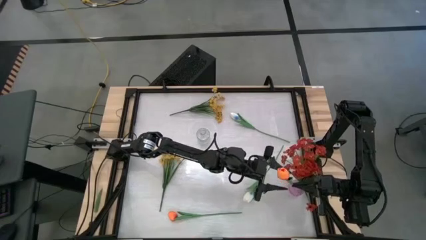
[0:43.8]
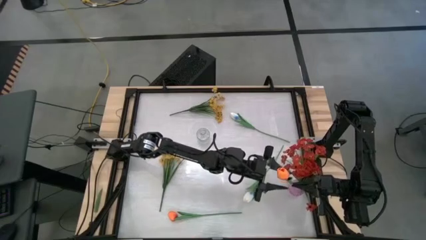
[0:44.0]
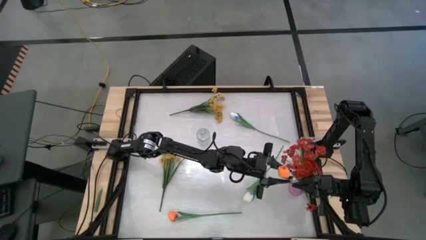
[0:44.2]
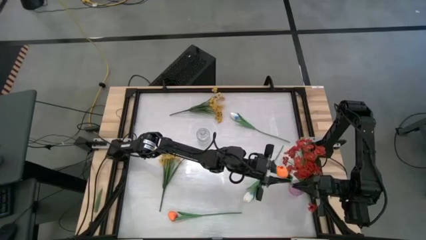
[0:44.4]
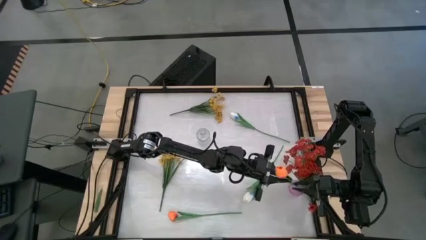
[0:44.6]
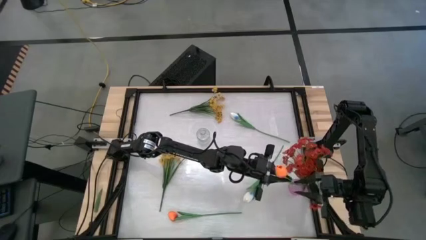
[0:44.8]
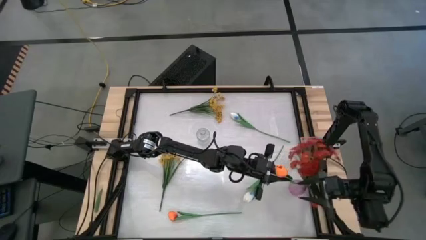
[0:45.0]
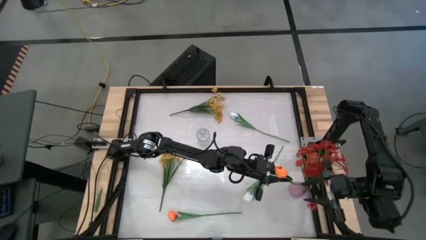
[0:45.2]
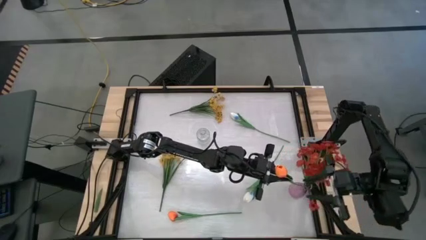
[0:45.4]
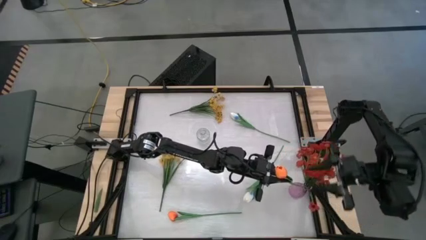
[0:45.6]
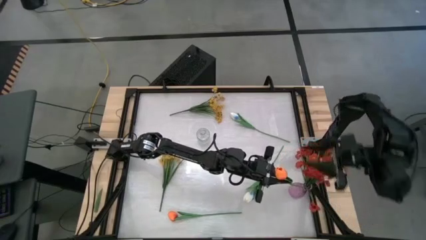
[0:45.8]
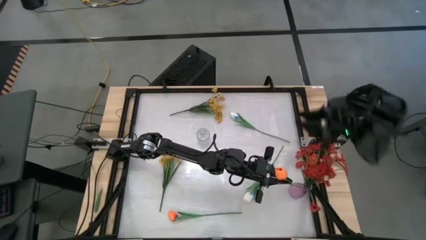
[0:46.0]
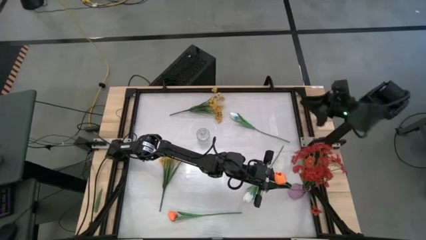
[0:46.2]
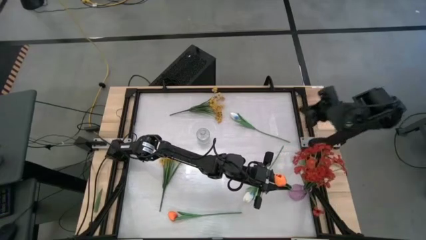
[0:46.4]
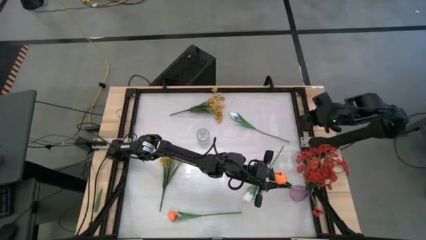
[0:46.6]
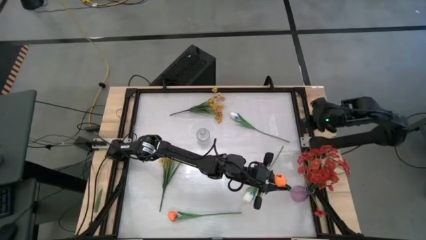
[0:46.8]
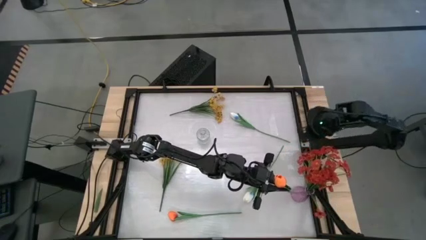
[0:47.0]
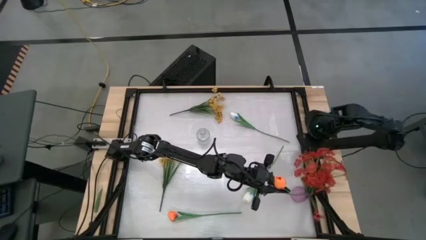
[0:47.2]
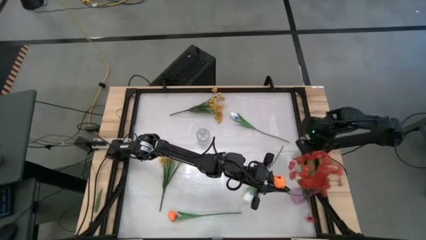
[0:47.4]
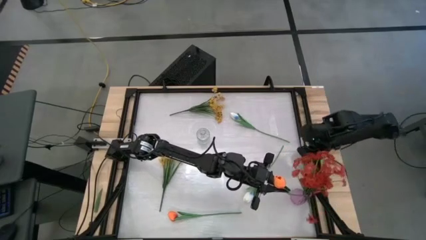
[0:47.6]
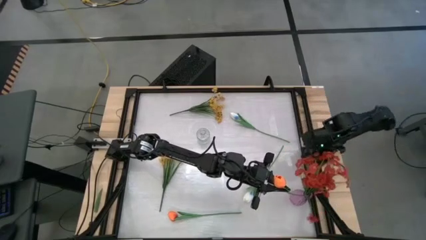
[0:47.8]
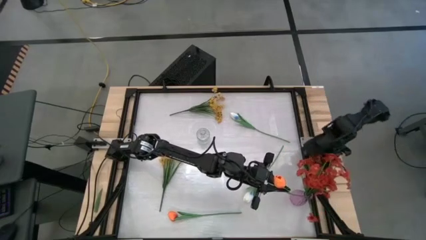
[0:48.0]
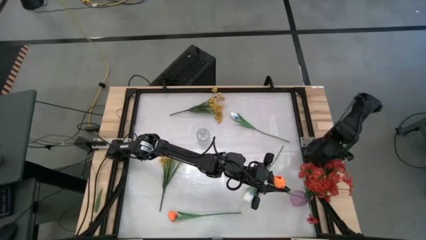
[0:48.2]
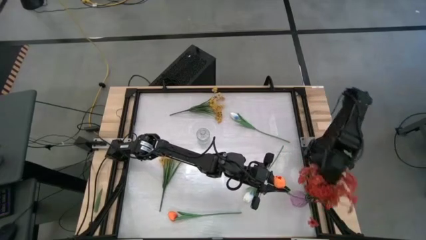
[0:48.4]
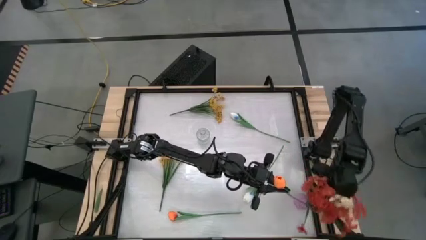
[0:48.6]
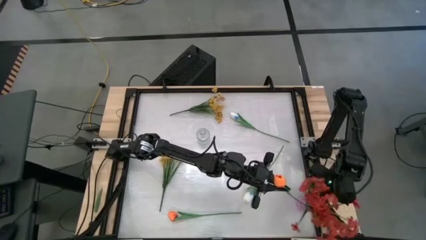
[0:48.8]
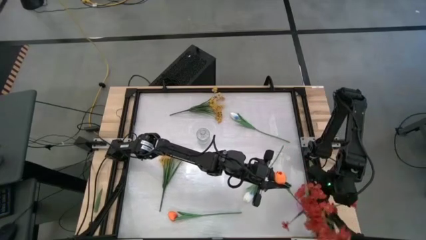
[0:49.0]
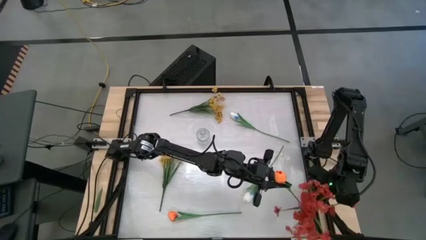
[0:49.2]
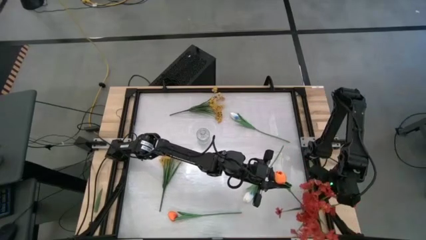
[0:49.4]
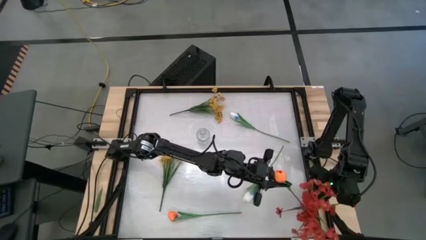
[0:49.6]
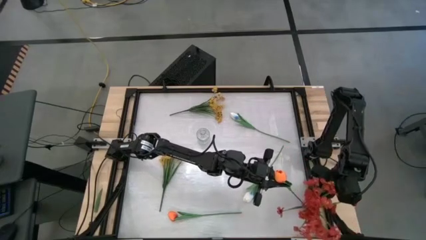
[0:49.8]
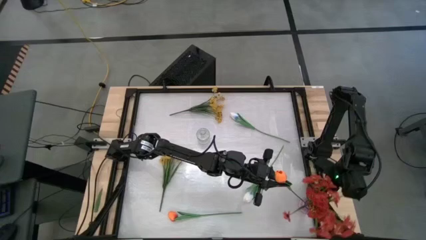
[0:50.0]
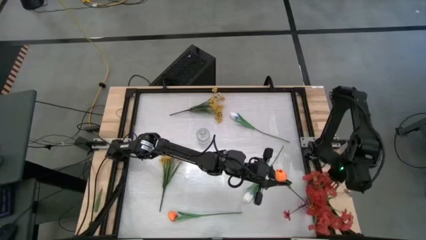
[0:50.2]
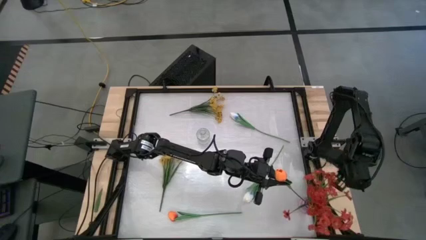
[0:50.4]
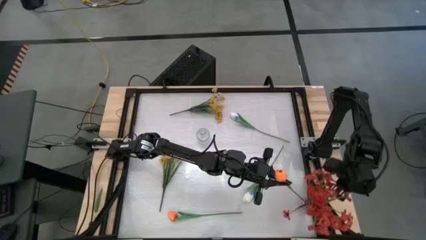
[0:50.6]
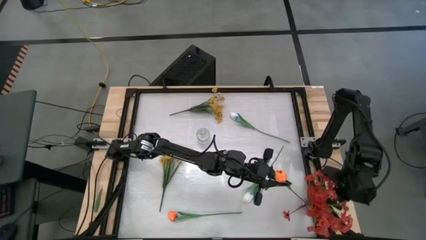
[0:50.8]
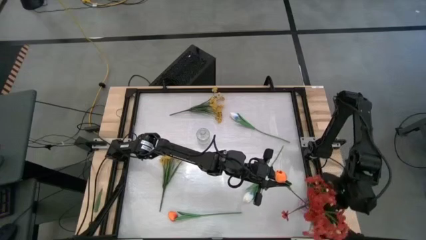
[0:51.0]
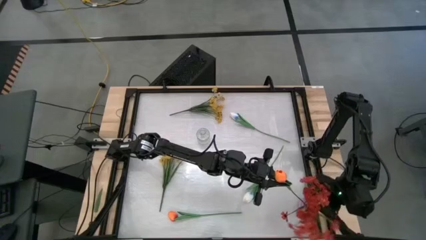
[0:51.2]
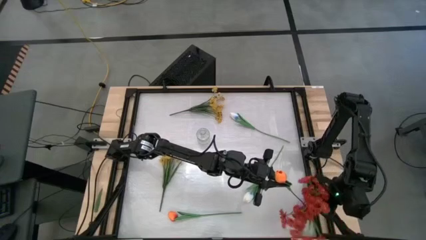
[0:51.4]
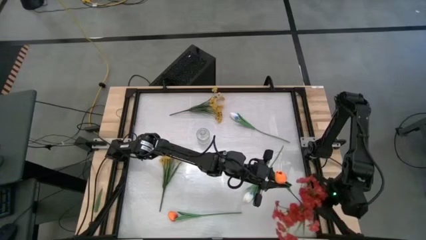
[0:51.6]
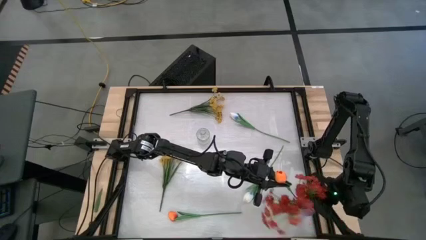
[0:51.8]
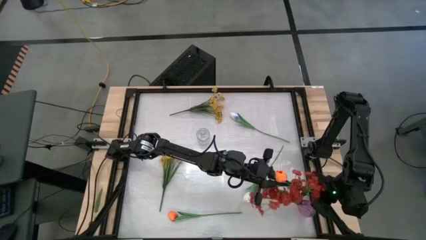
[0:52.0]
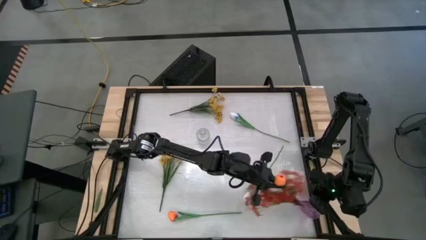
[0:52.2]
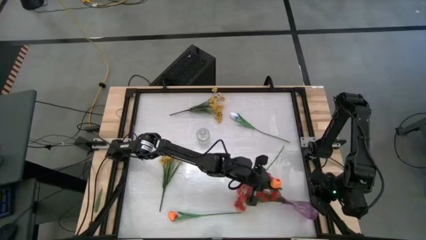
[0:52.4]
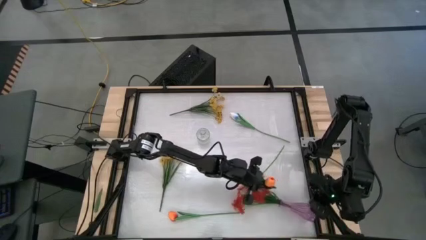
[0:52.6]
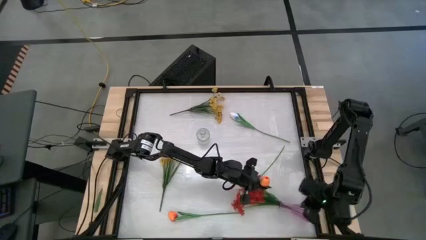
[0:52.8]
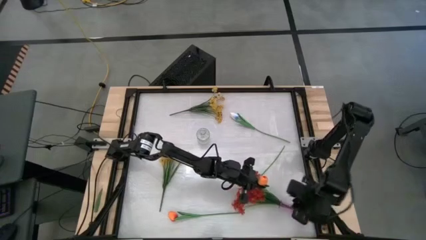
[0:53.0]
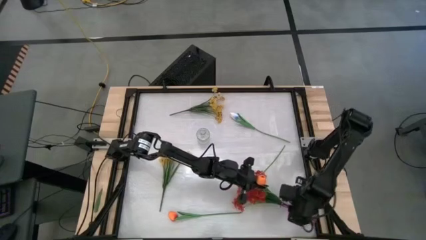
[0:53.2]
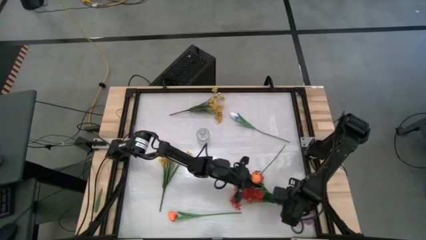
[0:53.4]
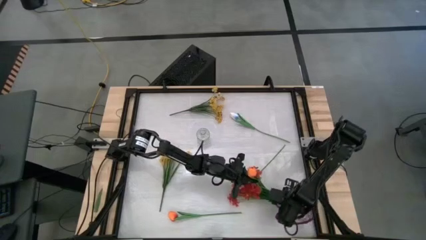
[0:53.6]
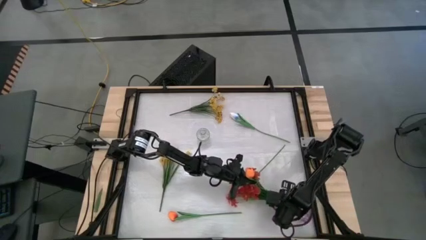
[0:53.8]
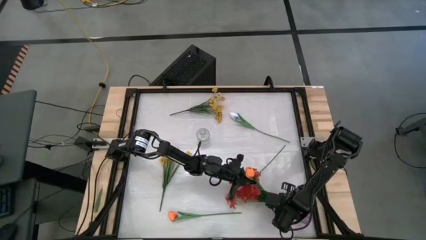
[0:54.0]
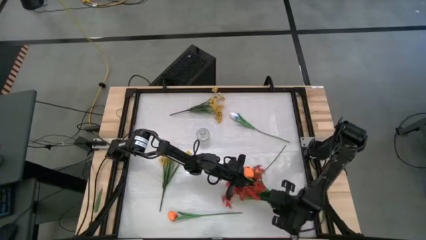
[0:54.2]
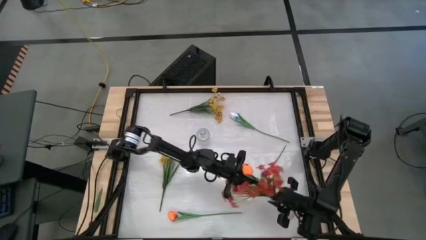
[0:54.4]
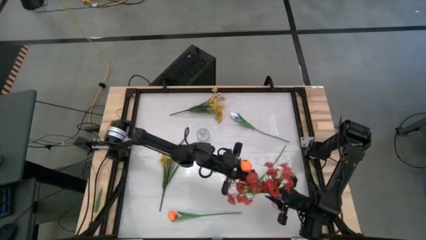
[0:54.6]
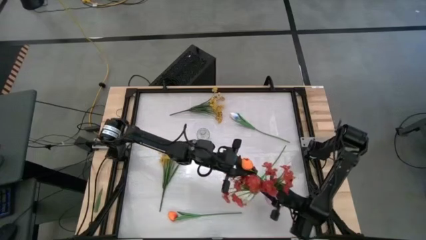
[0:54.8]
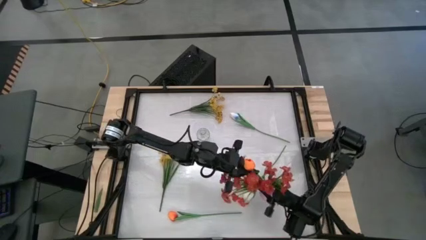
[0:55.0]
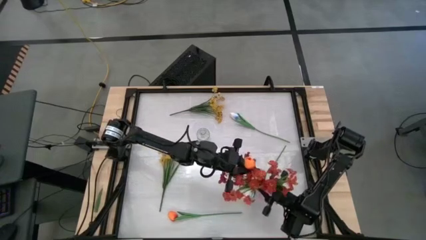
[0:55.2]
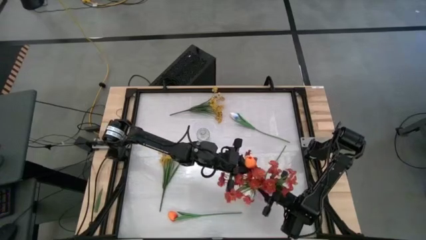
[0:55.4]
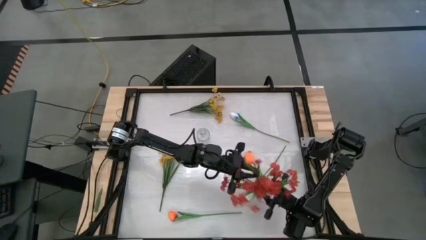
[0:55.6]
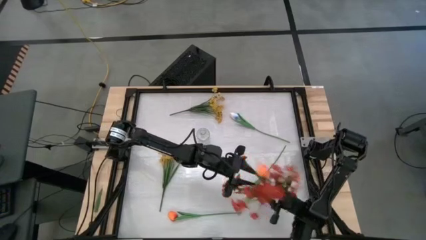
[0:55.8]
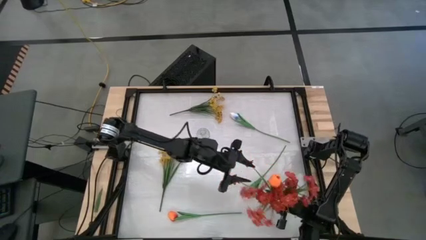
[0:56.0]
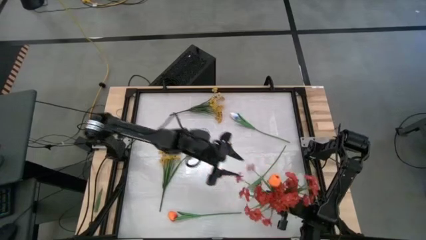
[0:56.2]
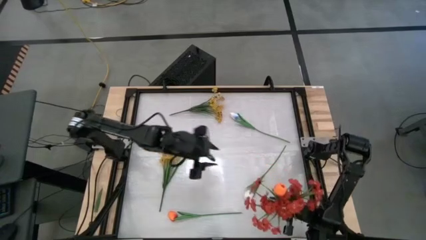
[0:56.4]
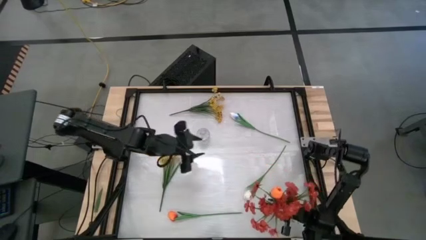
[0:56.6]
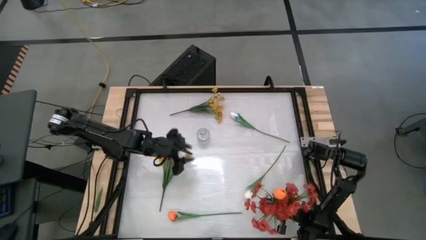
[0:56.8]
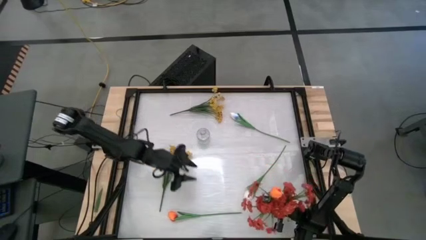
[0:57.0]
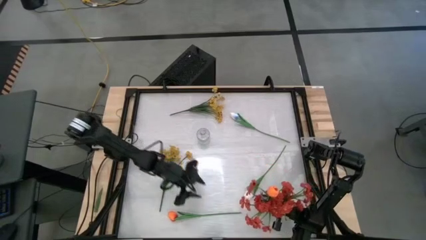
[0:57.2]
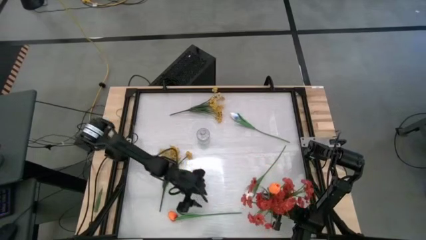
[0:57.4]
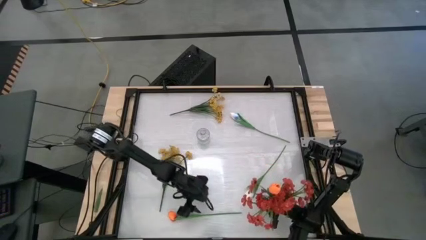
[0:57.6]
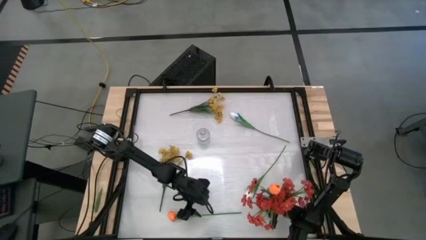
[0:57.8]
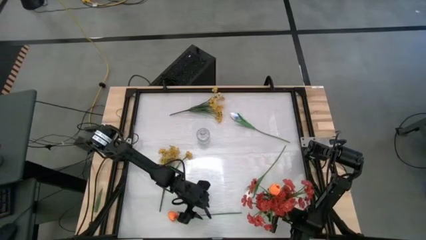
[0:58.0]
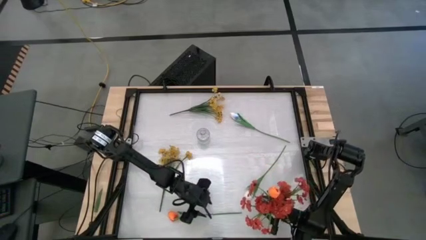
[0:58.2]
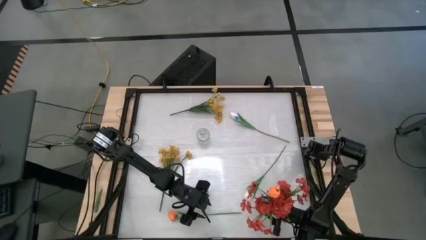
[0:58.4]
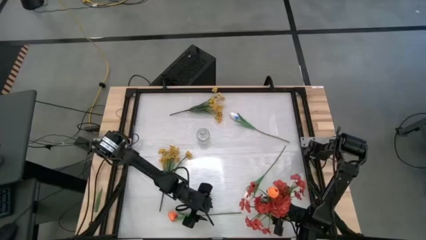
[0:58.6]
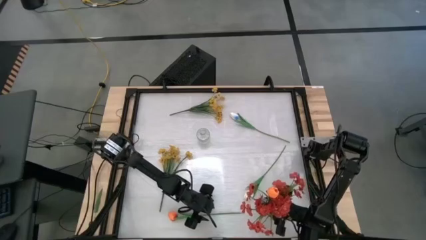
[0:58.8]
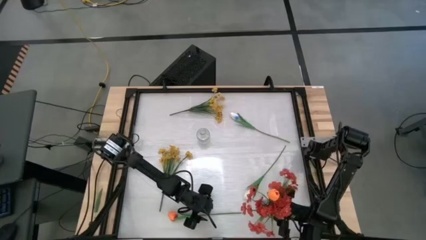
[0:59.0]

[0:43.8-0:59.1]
Task: Sort flowers into vase by color
Put the top orange flower into the pink vase
